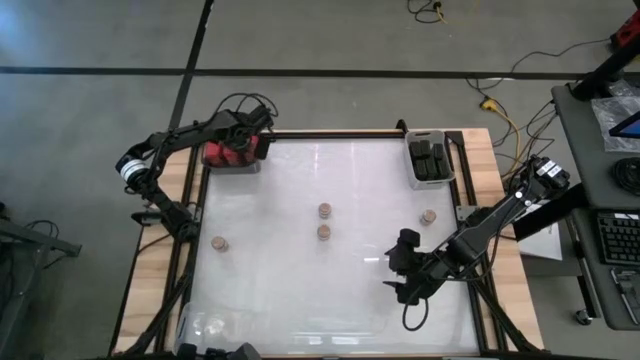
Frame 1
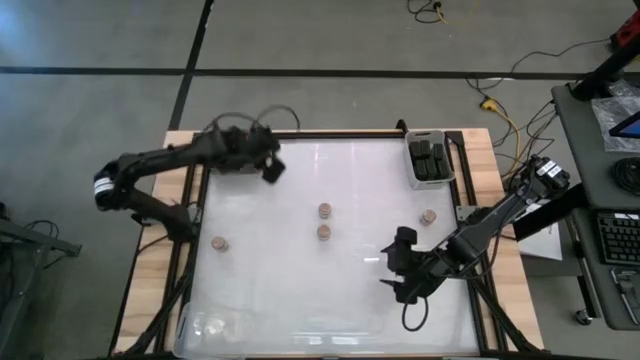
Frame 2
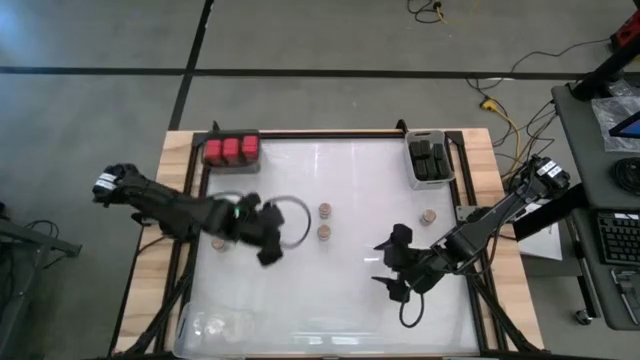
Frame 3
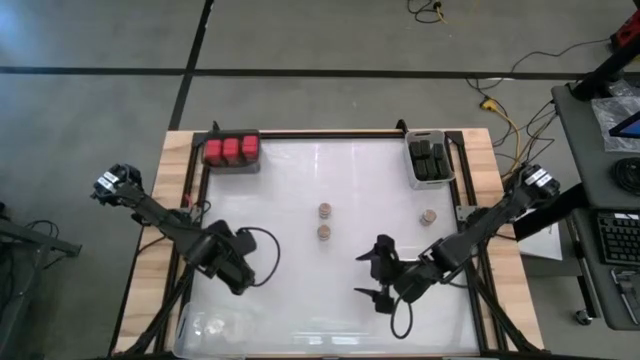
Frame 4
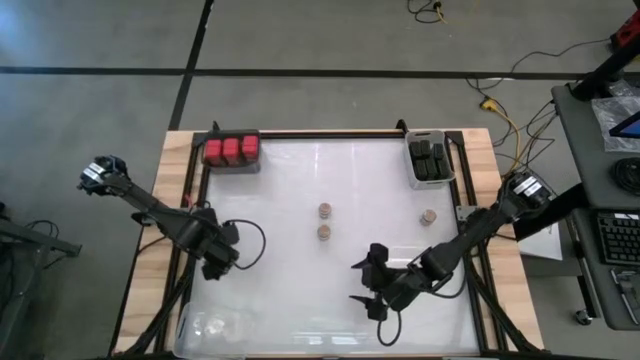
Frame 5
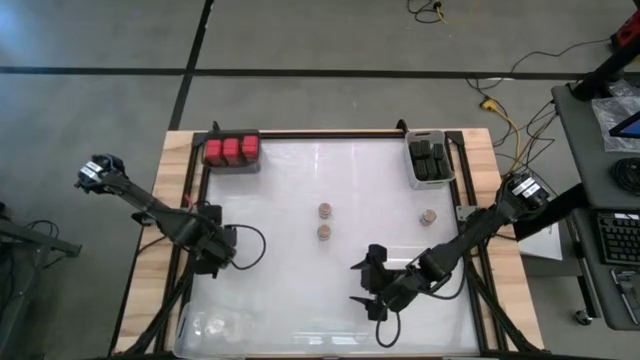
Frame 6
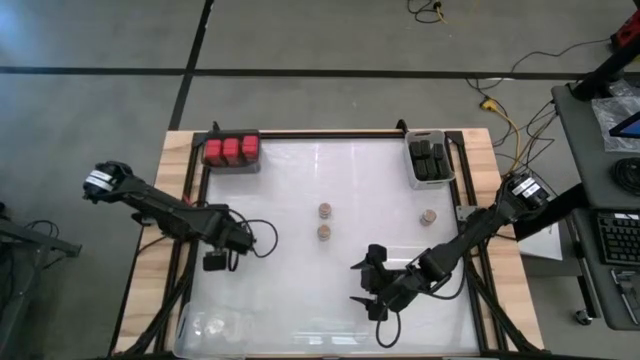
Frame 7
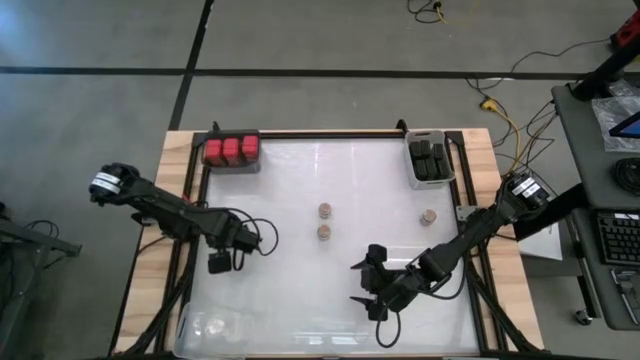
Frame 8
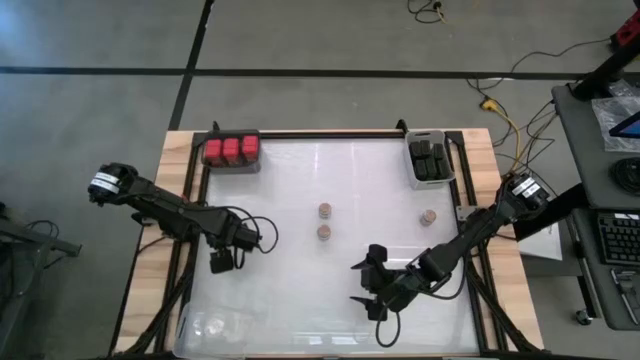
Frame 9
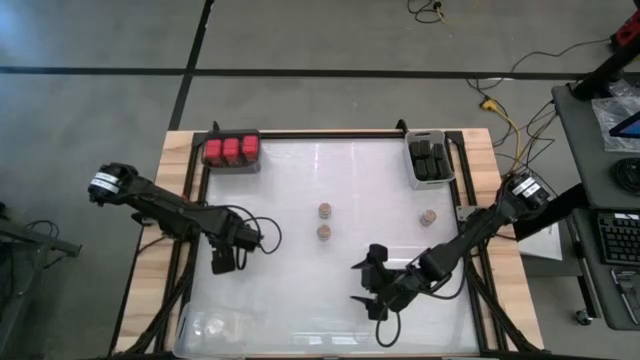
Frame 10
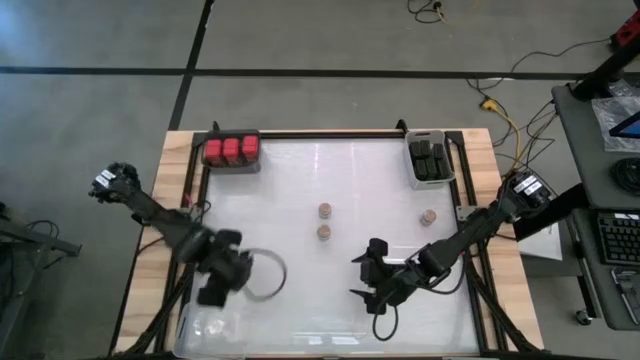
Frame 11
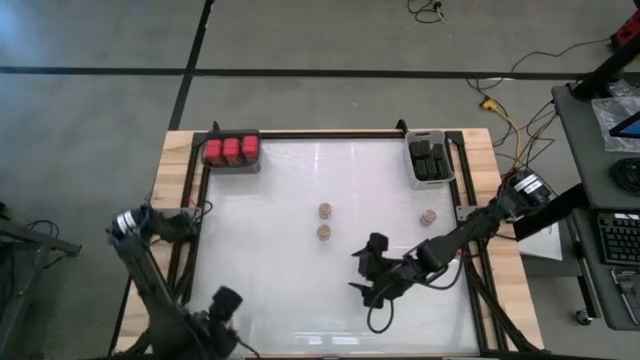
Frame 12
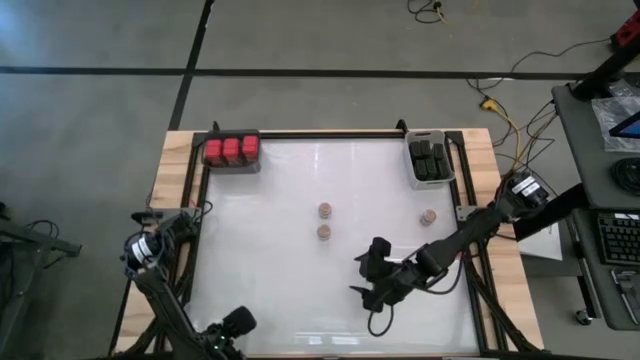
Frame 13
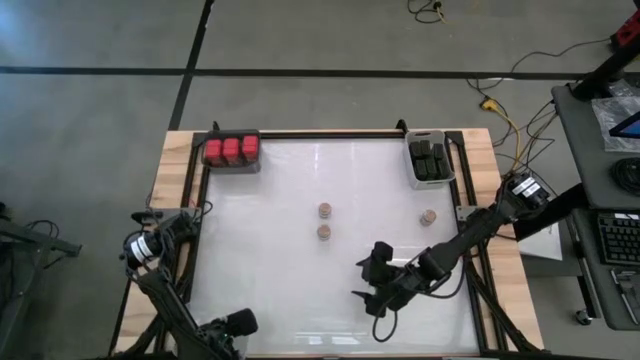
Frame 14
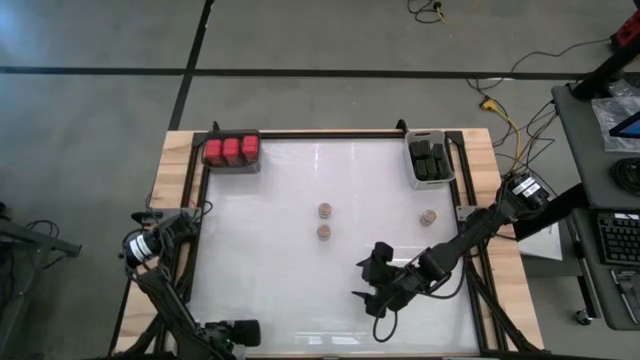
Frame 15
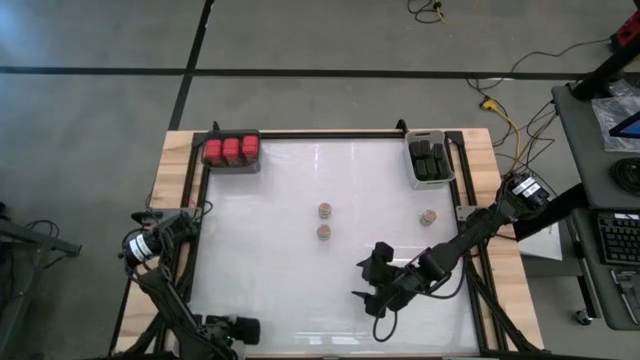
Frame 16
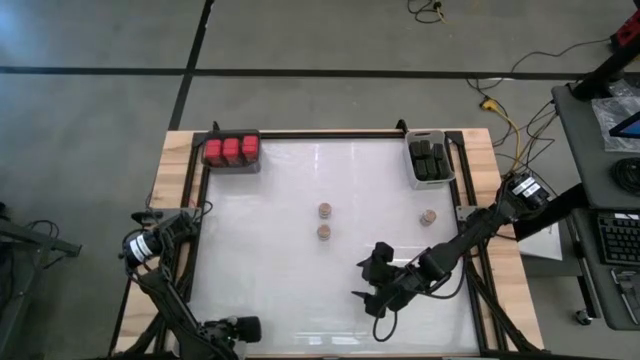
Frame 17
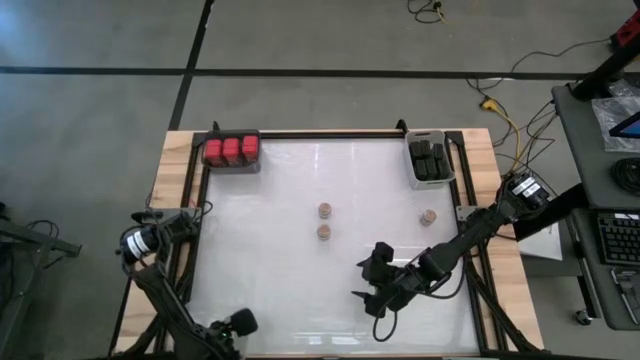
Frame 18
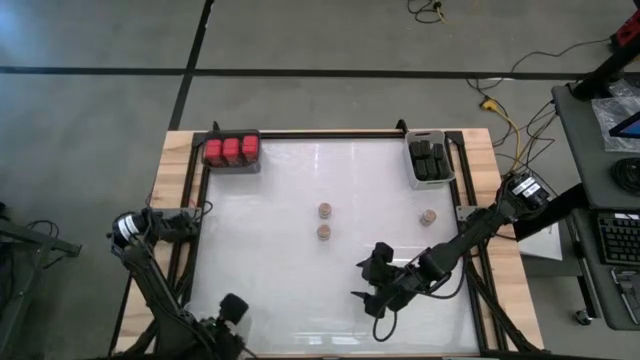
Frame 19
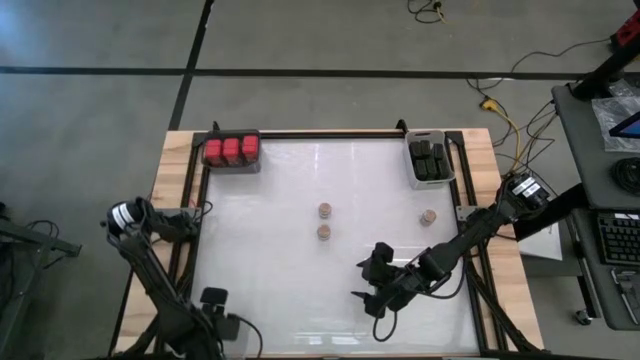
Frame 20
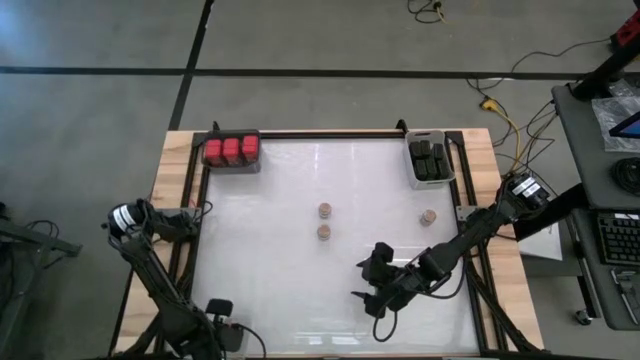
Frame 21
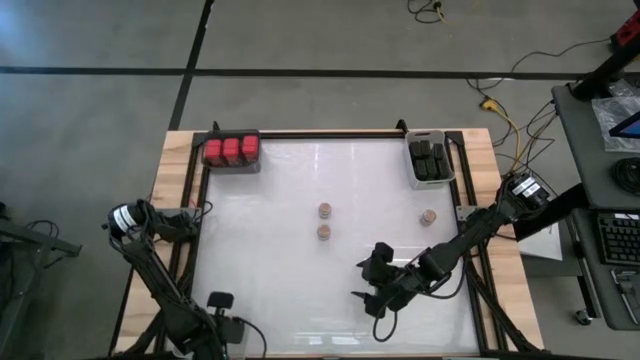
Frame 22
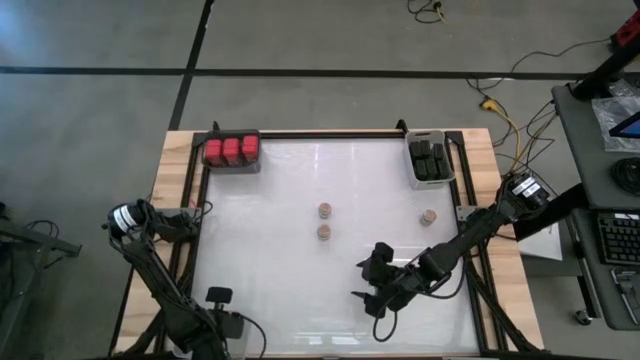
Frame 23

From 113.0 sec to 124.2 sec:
Task: Sort spices by type
Put the brown seasoning bottle into the transparent bin

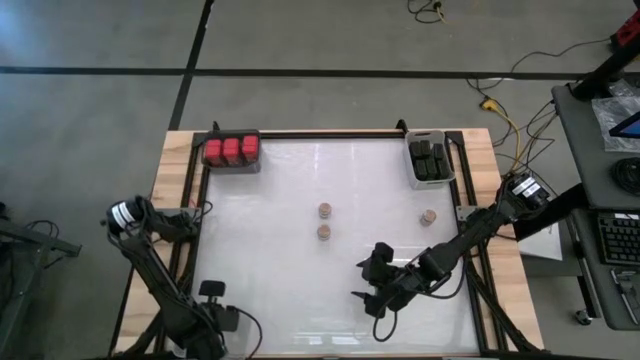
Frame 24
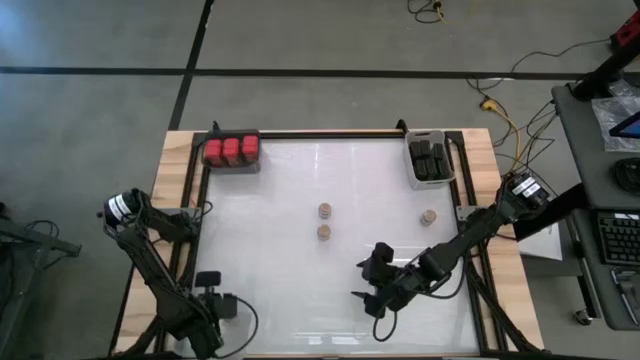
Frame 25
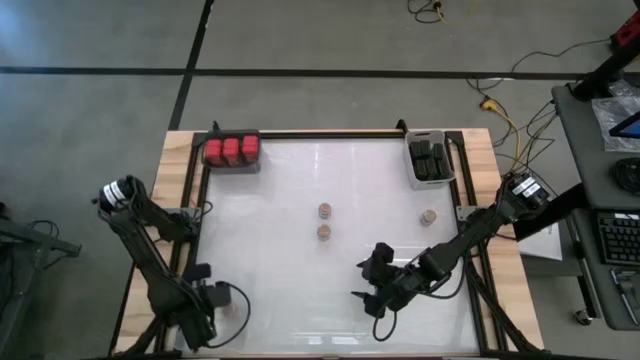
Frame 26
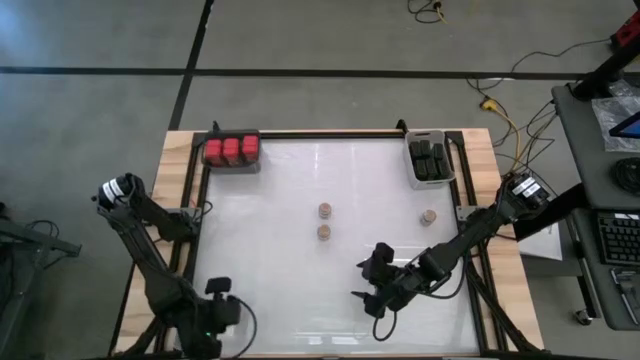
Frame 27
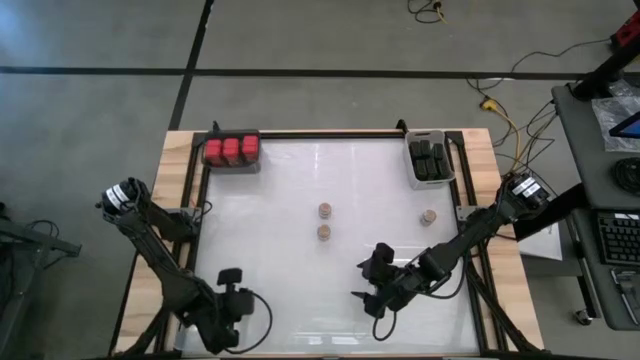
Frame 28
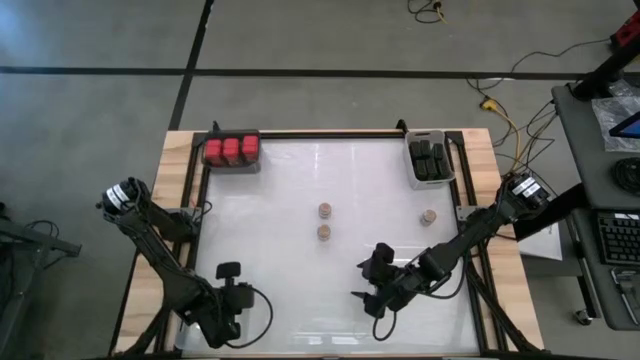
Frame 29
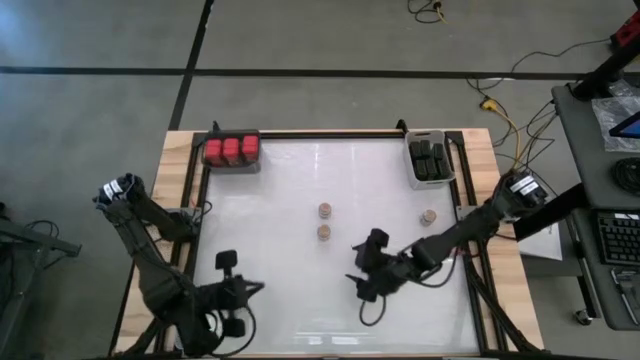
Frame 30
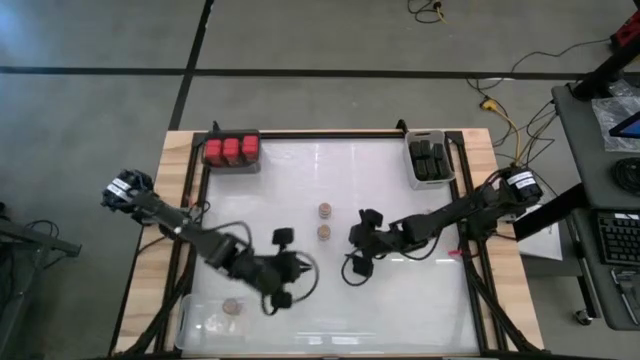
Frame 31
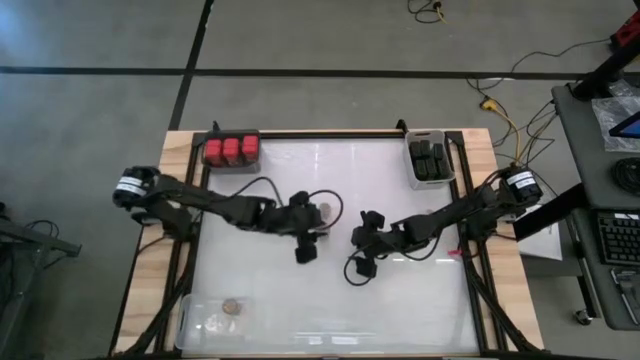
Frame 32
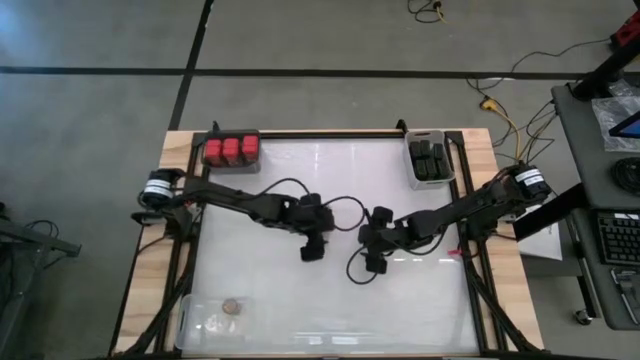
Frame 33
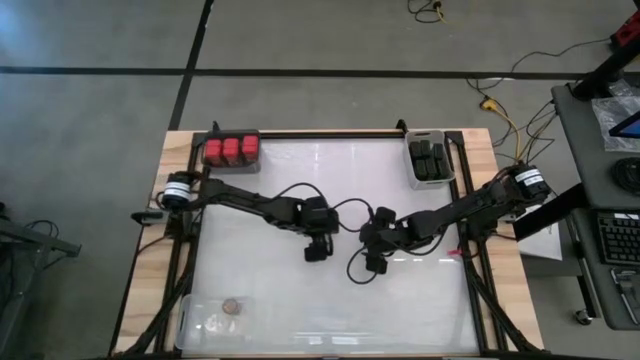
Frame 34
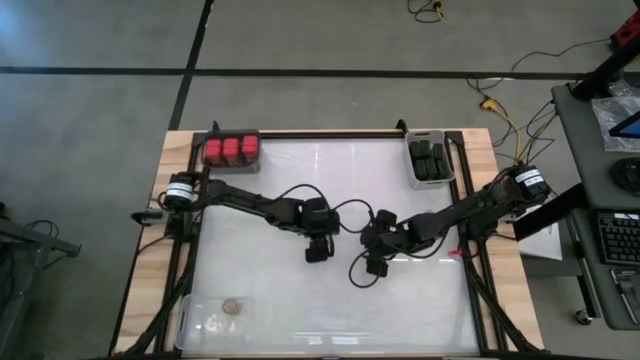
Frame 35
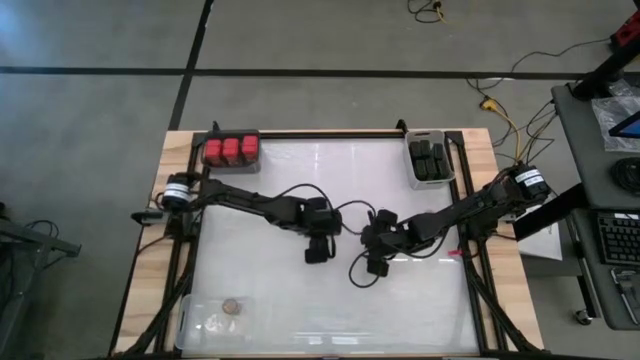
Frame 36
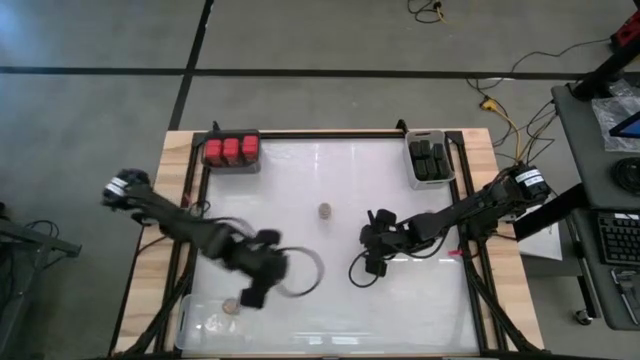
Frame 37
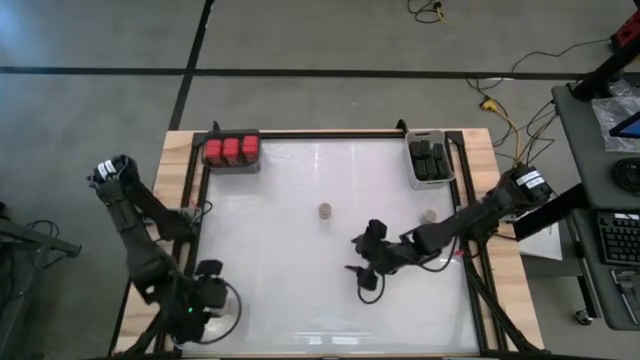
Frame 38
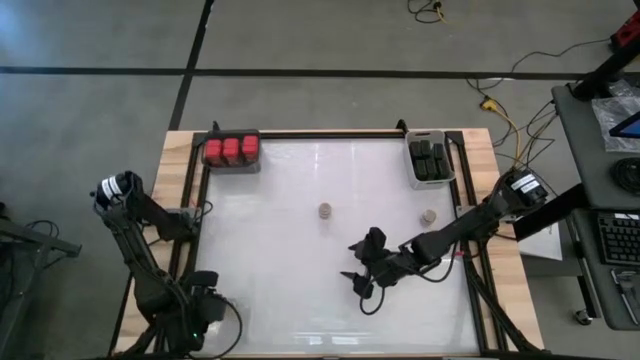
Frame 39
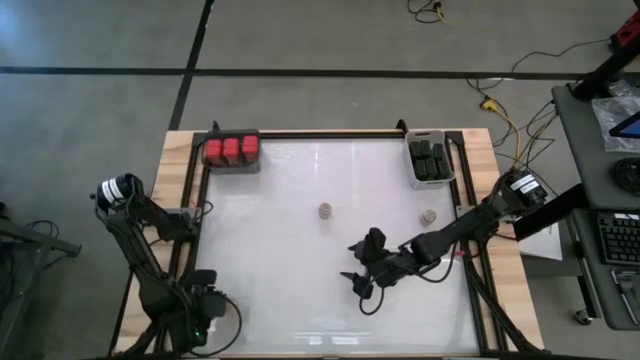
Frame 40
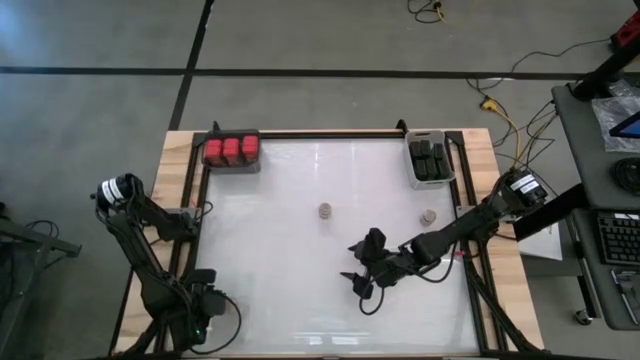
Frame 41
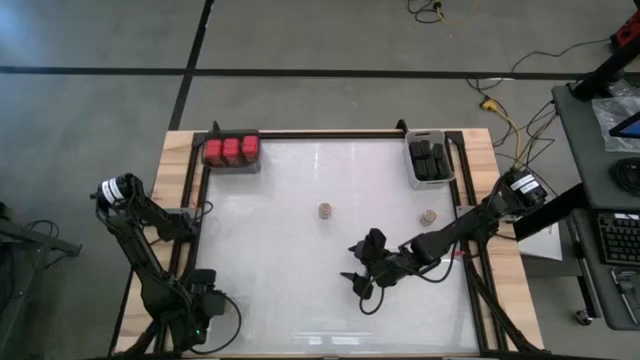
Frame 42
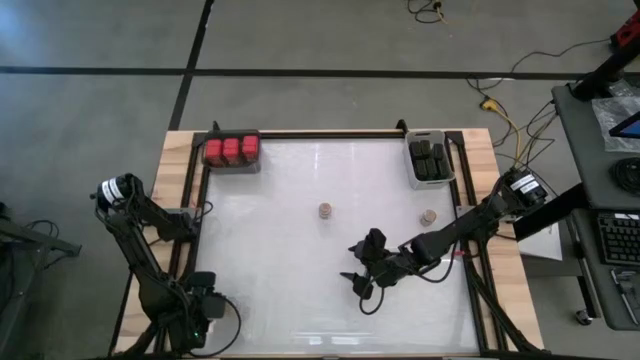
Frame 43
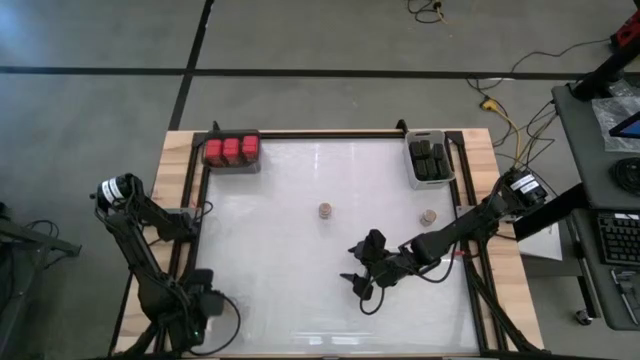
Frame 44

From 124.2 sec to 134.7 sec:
Put the brown seasoning bottle into the transparent bin
